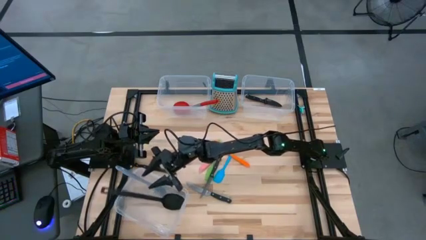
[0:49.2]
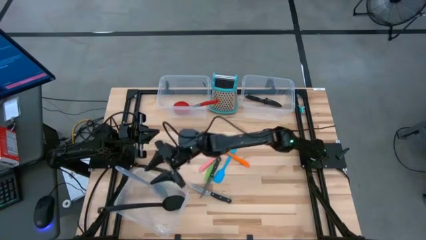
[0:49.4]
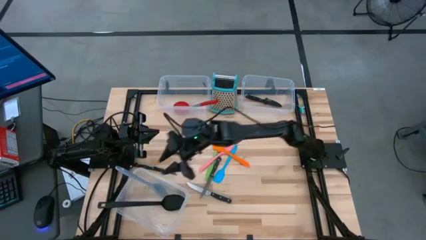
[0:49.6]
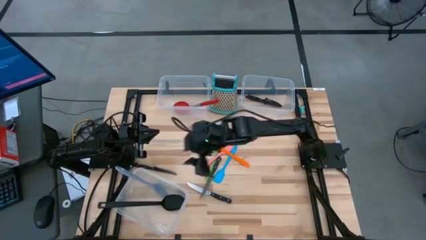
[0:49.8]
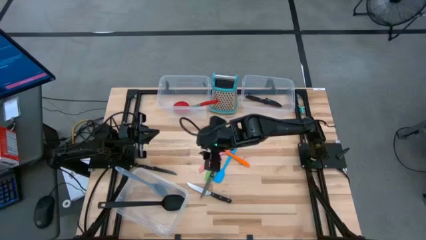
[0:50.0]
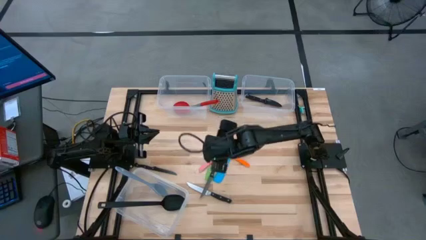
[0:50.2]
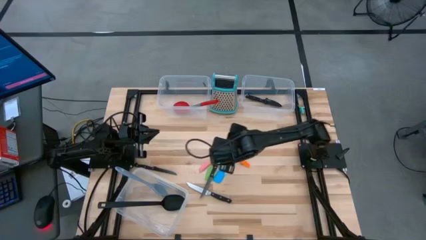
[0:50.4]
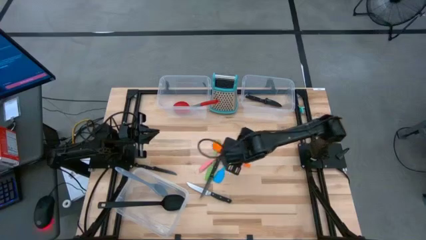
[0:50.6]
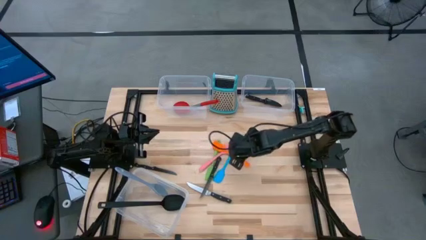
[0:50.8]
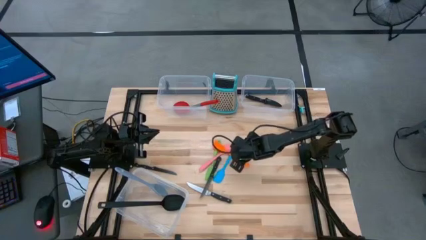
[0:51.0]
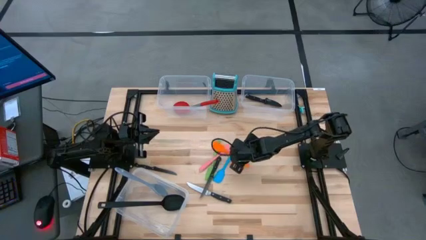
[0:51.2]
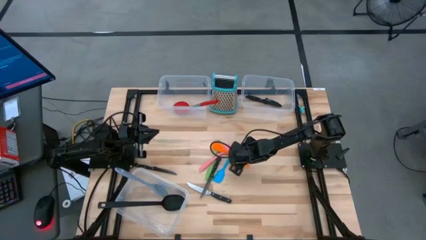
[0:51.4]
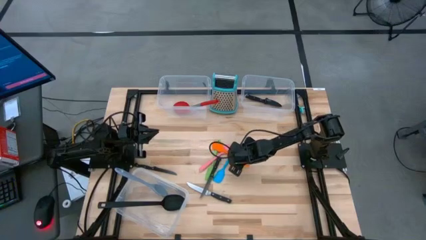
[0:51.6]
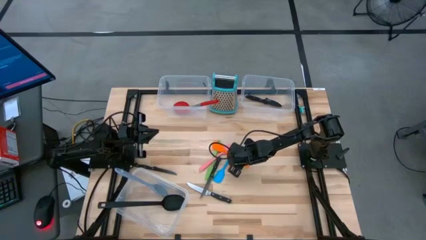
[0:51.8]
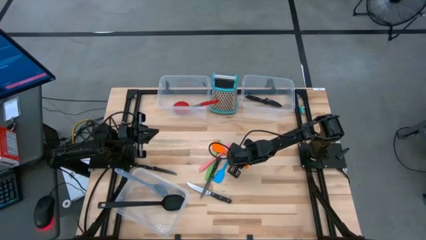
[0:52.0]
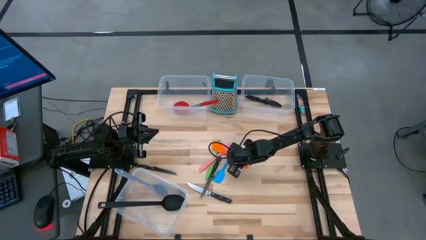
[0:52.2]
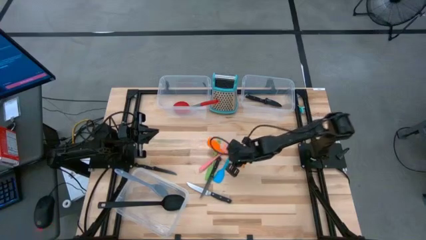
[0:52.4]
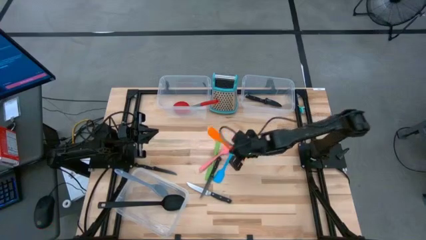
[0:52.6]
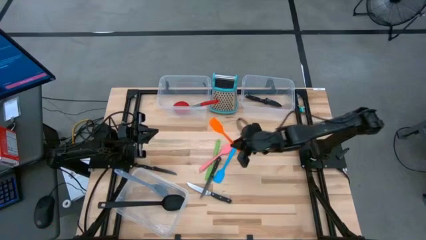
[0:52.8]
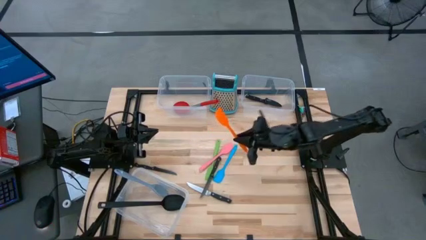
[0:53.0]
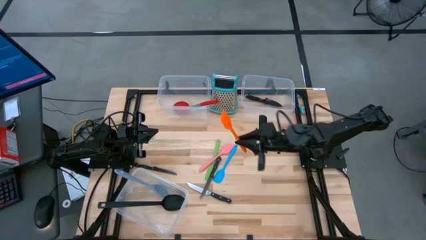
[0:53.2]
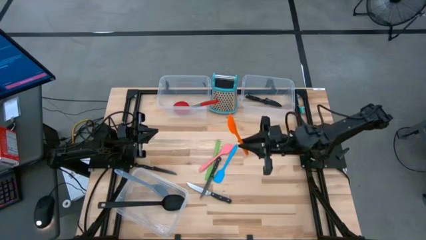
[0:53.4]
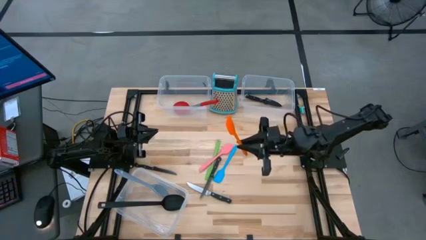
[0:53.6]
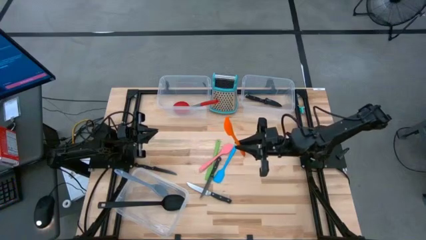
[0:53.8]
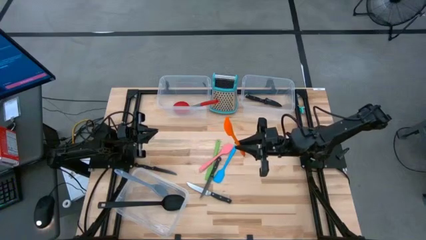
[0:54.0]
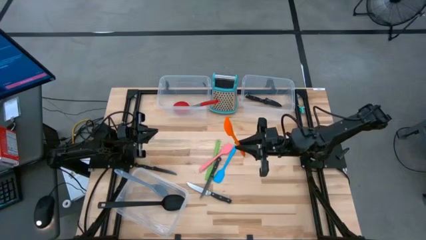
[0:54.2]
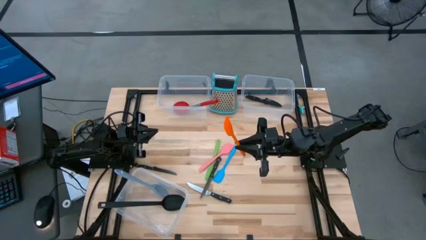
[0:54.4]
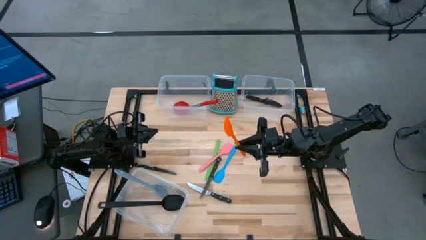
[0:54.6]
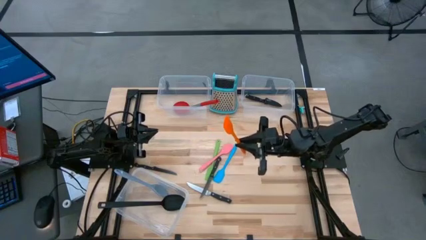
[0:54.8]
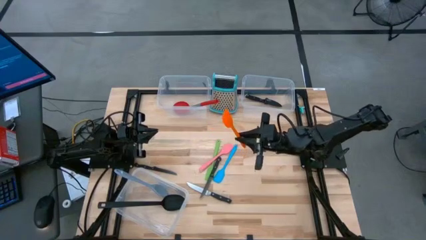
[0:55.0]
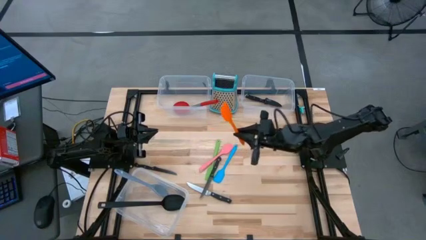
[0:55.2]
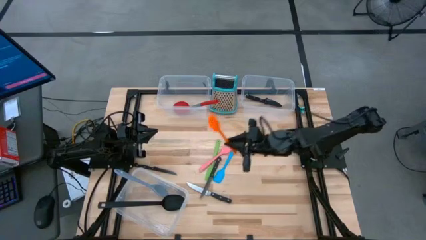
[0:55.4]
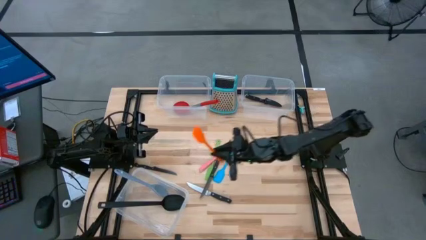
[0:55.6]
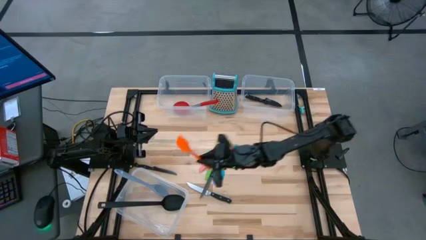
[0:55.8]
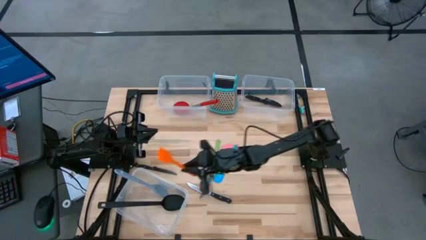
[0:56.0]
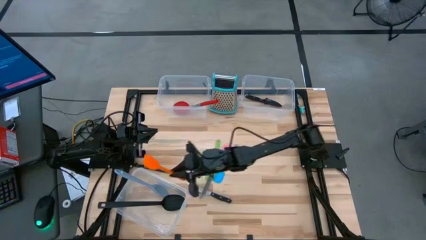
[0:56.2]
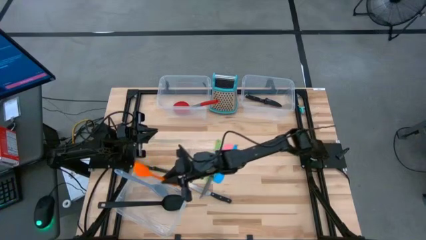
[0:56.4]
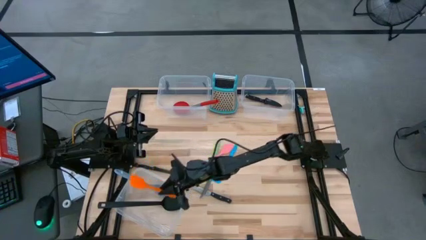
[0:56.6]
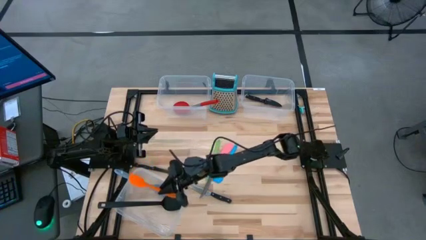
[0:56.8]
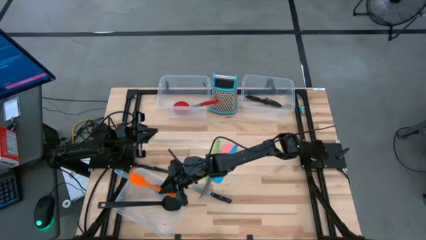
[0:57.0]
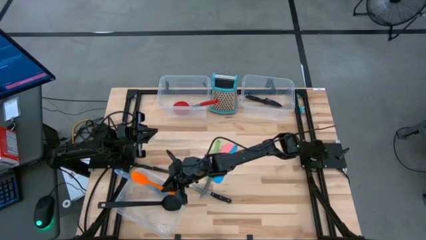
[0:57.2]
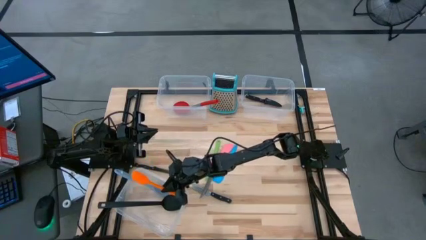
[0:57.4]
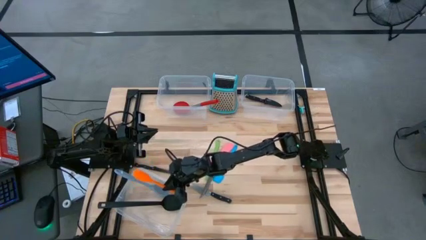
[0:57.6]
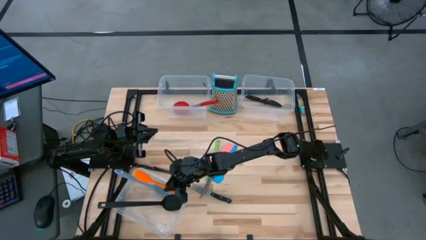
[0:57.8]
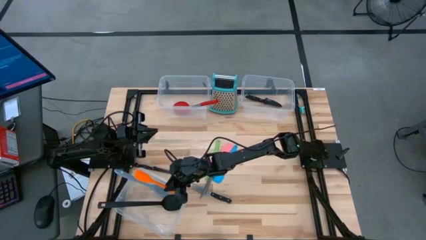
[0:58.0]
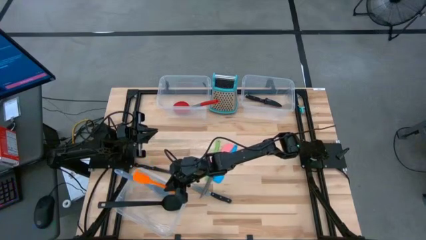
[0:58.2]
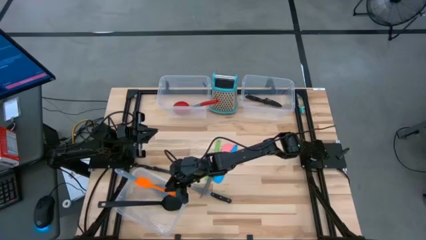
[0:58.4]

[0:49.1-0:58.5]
Task: Pick & Place Kitchen Items
Put the orange spatula into the bottom transparent bin
